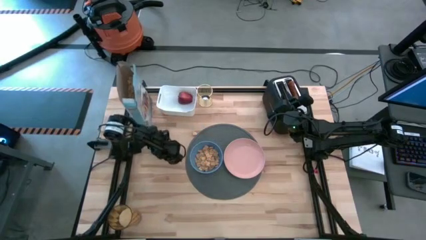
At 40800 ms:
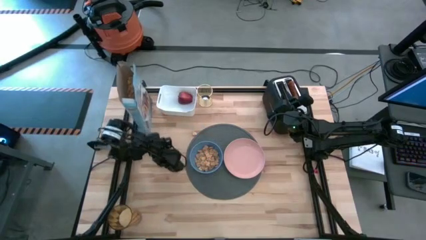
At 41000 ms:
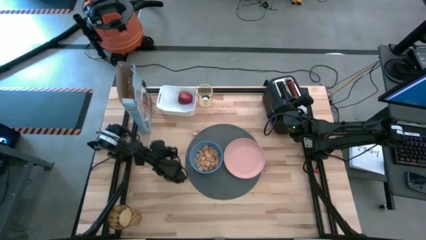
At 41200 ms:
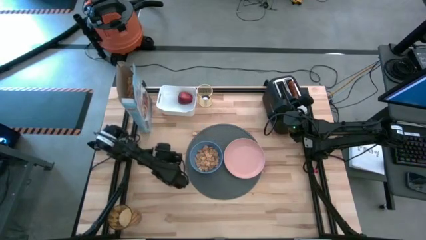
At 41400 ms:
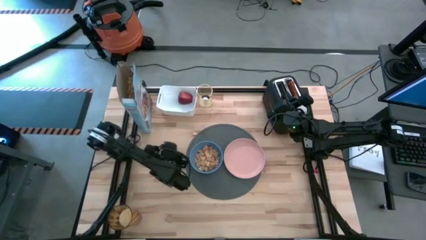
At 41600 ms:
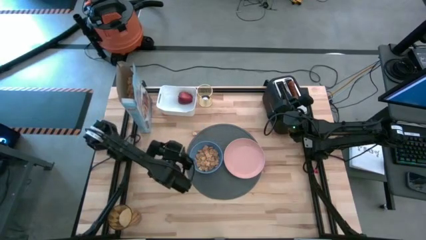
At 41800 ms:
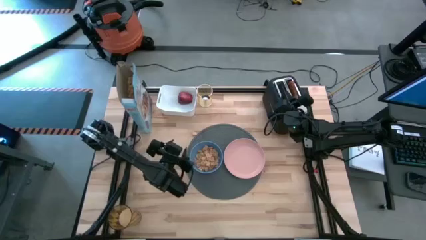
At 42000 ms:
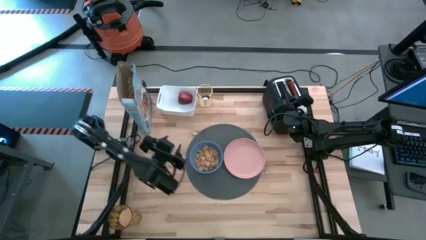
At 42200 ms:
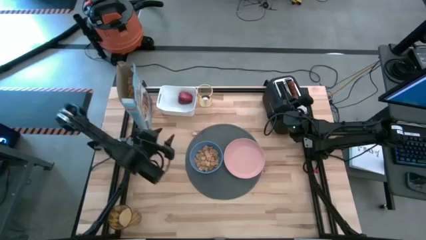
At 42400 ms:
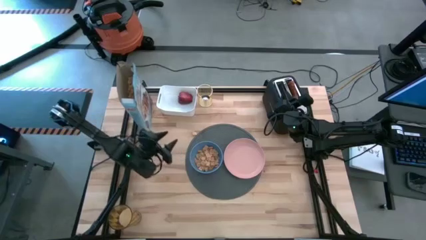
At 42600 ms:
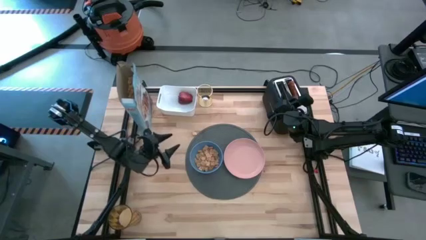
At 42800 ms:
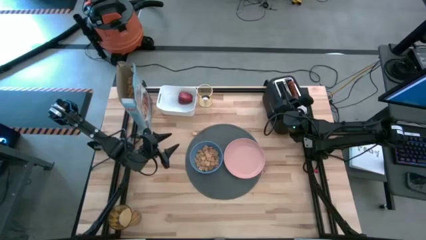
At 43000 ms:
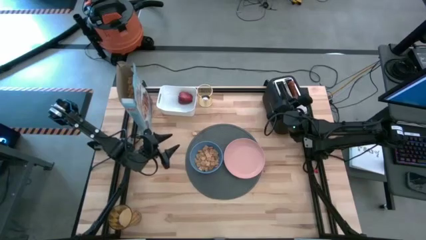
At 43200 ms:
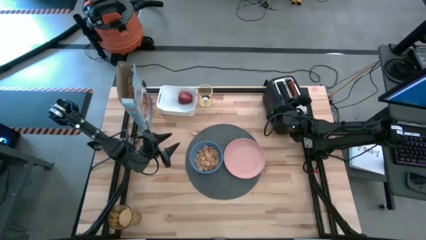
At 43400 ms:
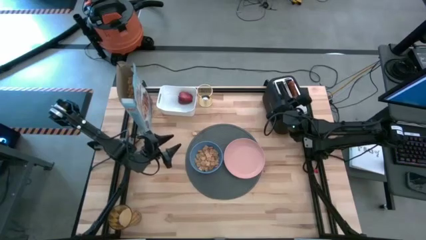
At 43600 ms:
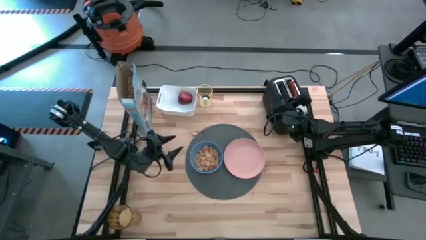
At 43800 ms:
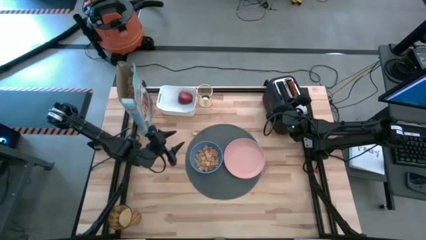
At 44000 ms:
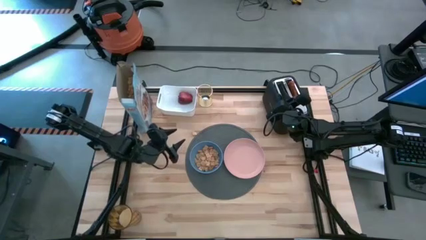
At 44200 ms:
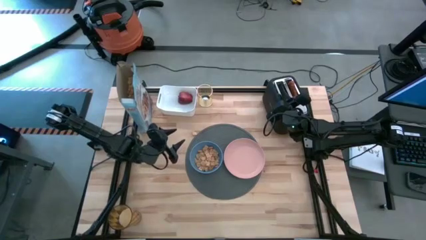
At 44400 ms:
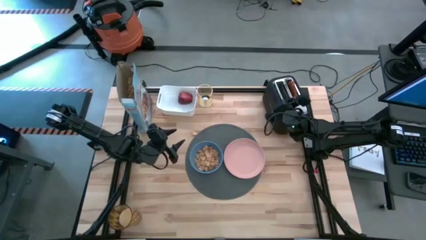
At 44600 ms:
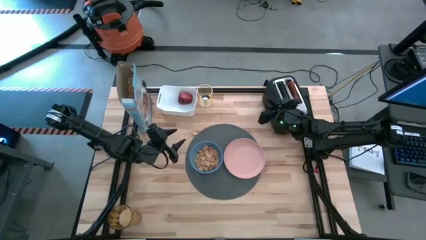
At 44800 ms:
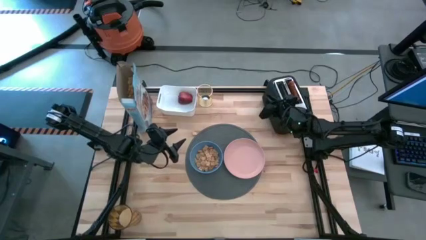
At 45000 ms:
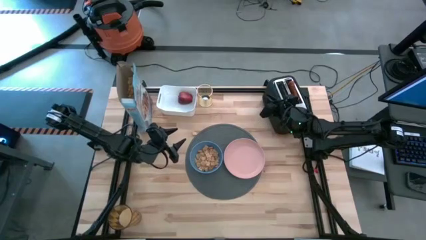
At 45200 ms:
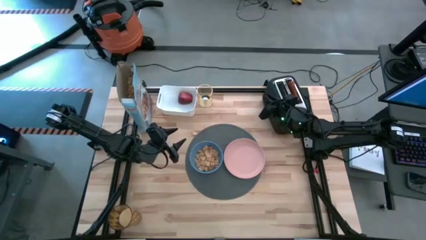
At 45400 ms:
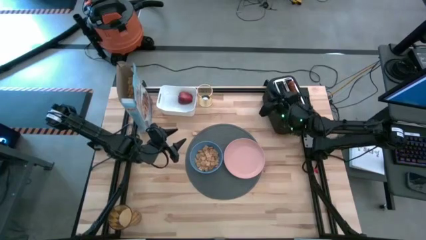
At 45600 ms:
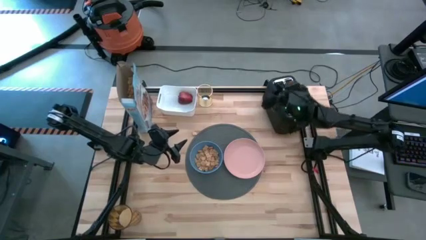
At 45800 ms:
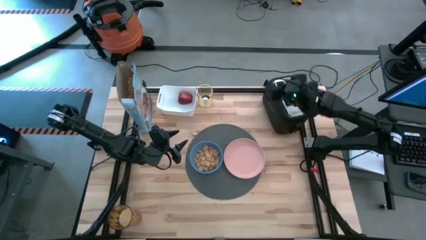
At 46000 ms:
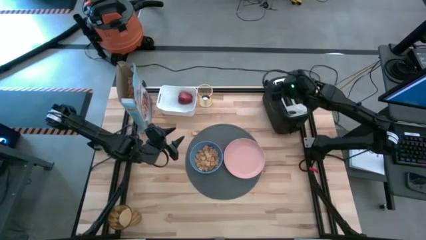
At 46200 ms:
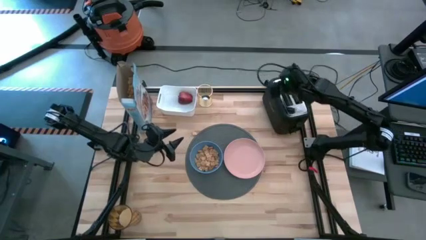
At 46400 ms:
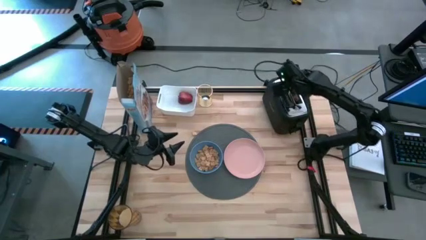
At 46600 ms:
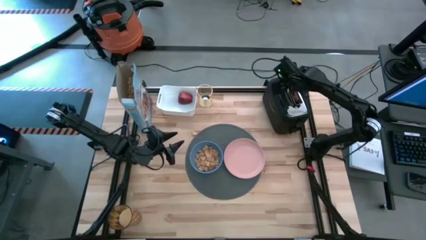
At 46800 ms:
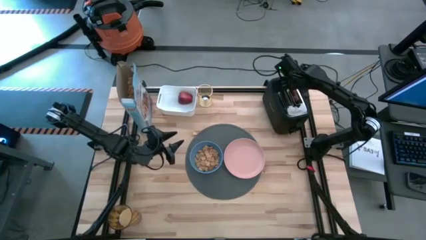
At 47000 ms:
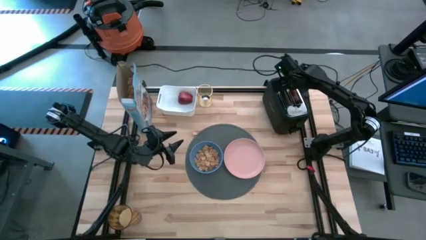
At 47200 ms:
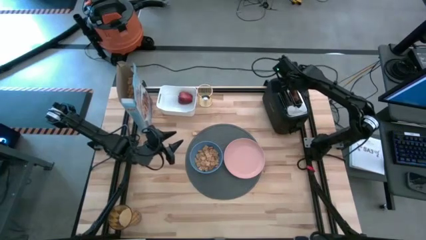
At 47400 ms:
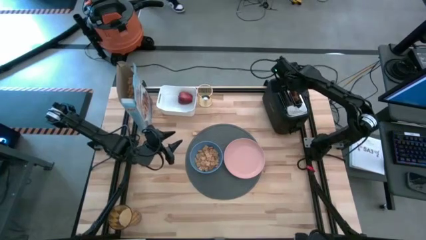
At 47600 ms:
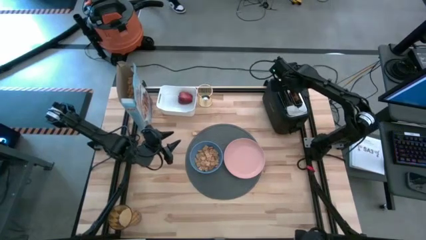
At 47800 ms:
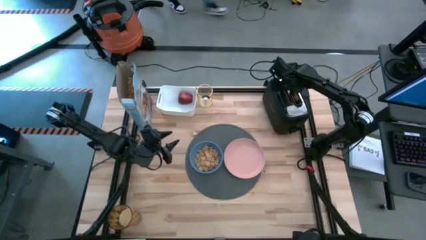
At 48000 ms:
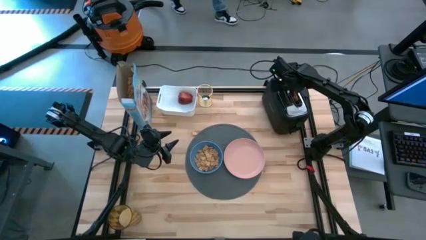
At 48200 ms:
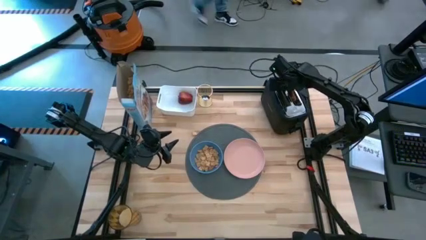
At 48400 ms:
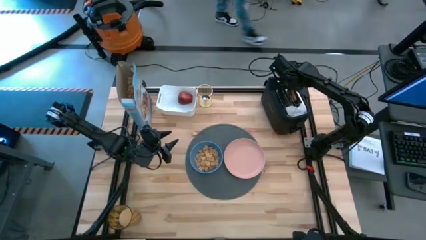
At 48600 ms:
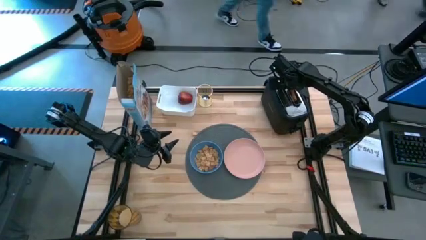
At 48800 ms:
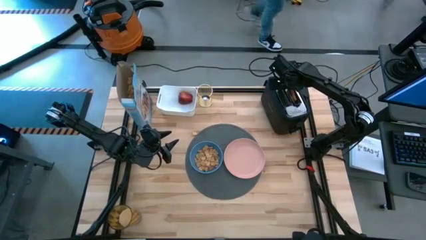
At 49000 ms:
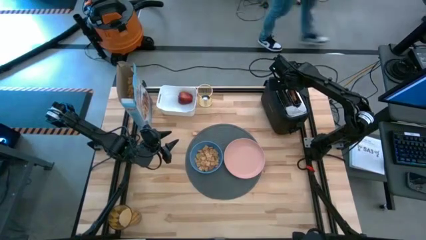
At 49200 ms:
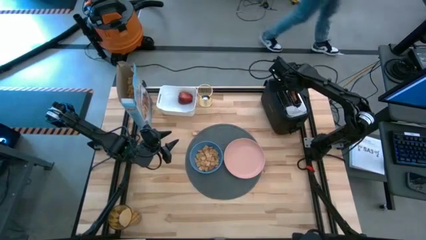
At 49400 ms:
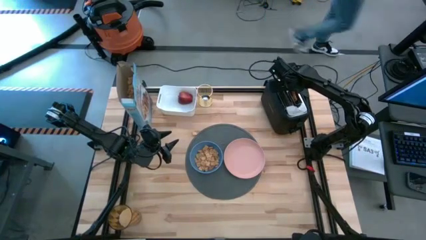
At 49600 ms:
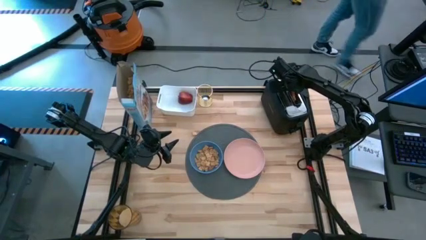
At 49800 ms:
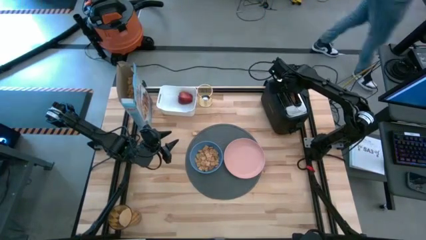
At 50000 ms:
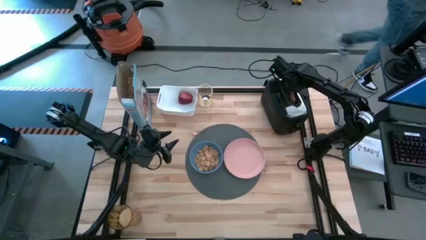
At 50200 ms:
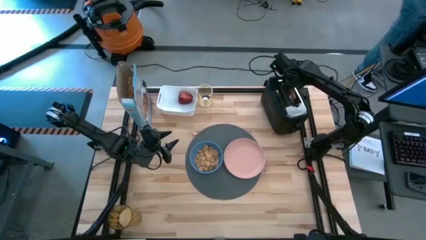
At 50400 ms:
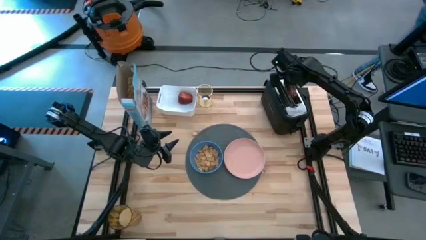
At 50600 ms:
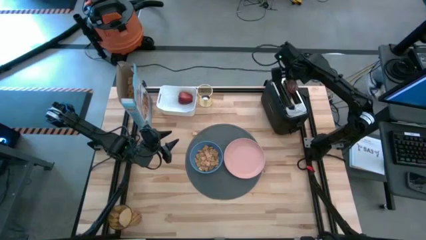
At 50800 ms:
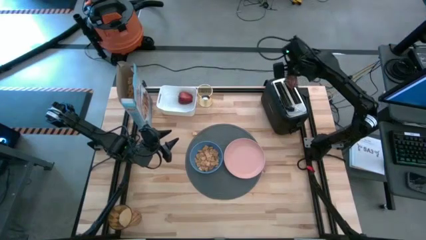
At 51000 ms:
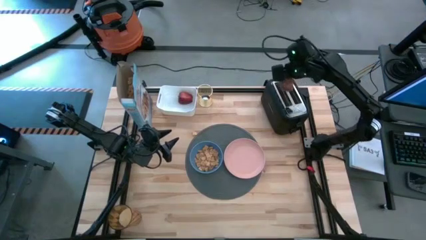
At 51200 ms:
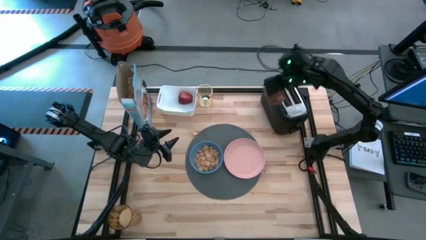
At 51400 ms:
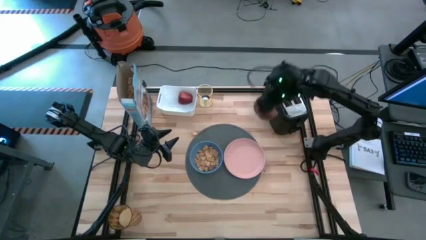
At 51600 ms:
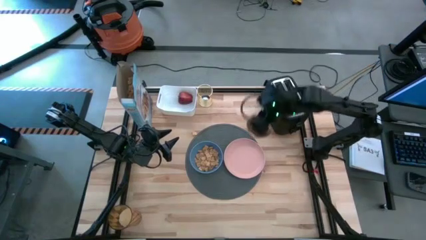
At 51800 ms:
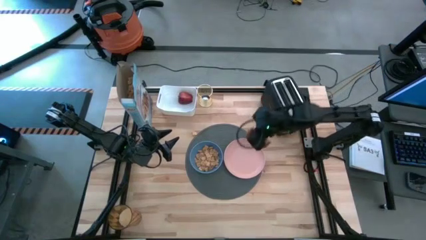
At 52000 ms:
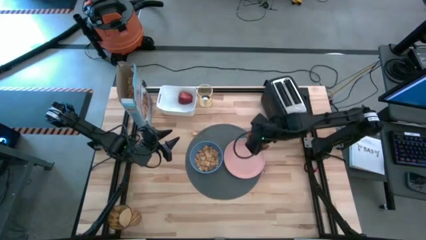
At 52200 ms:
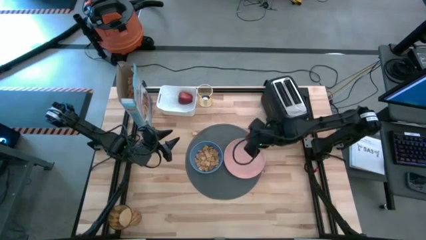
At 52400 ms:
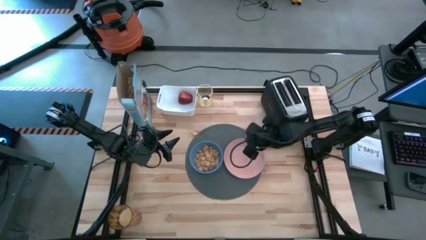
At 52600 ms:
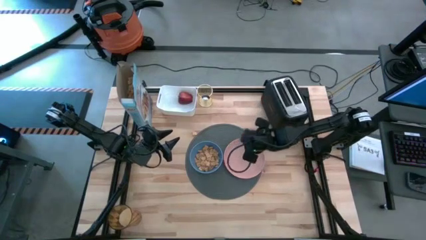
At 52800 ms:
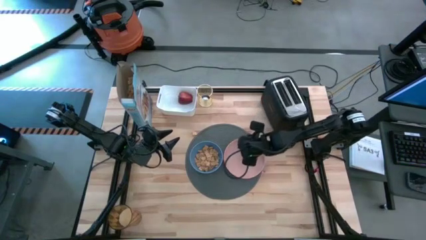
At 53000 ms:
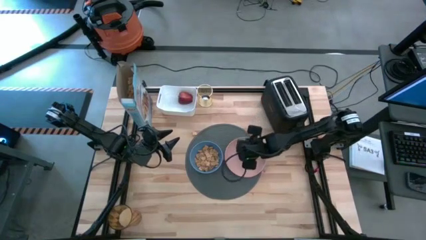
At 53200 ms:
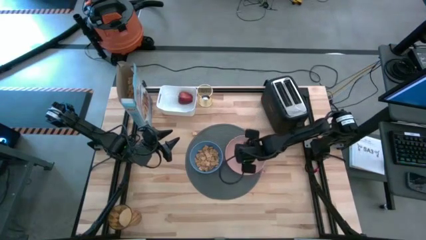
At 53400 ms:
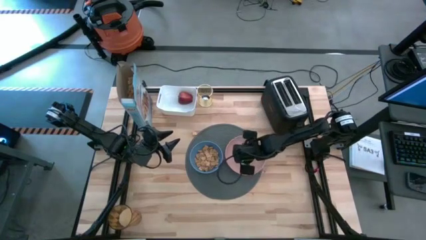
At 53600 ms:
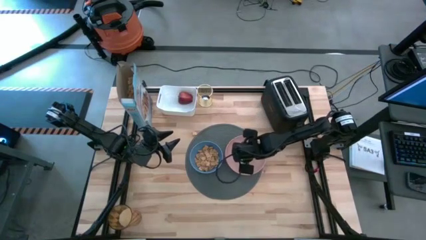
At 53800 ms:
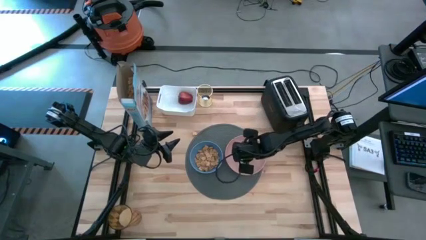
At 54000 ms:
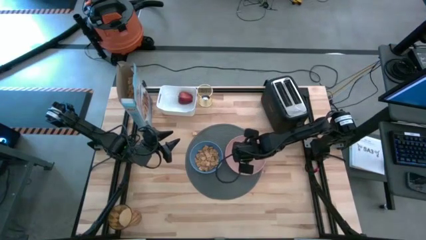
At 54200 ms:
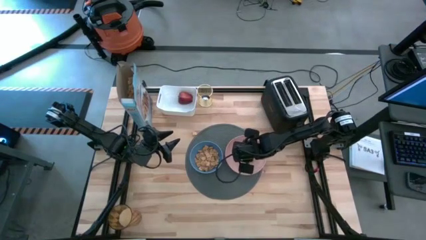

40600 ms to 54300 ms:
Task: Arrange a breakfast setting
Put the toasted bread on the pink plate on the gray mat
